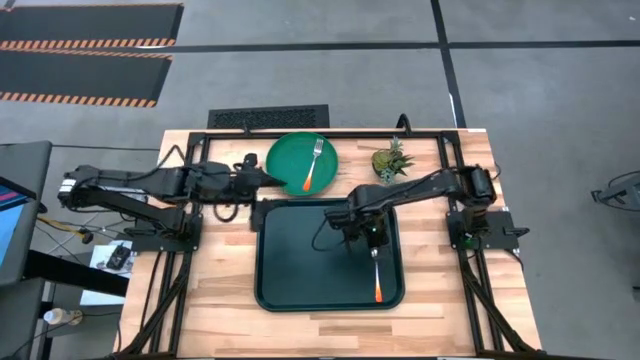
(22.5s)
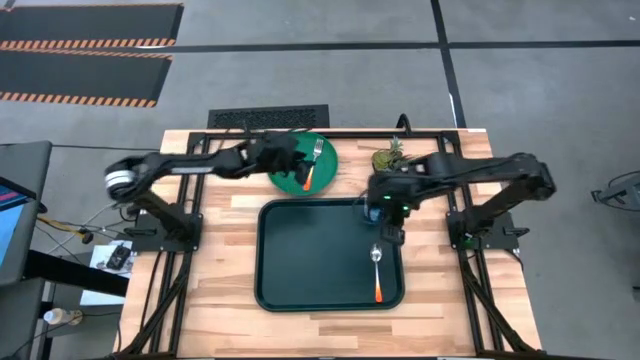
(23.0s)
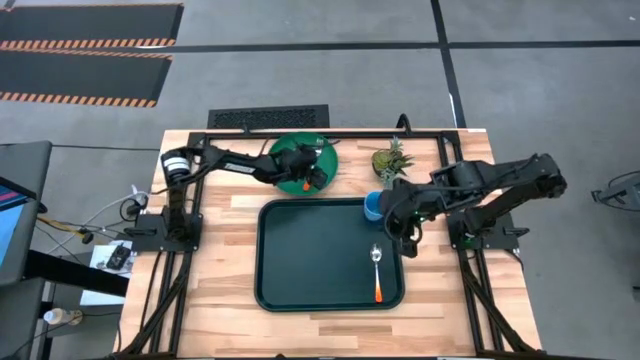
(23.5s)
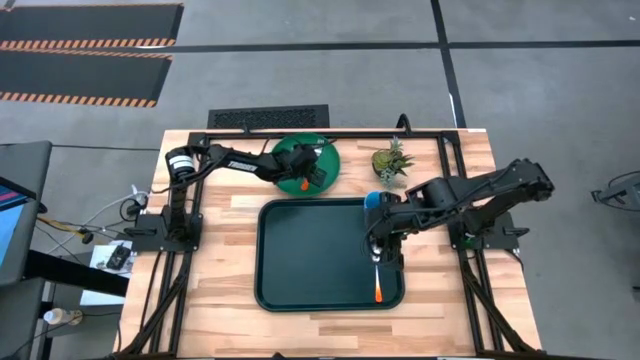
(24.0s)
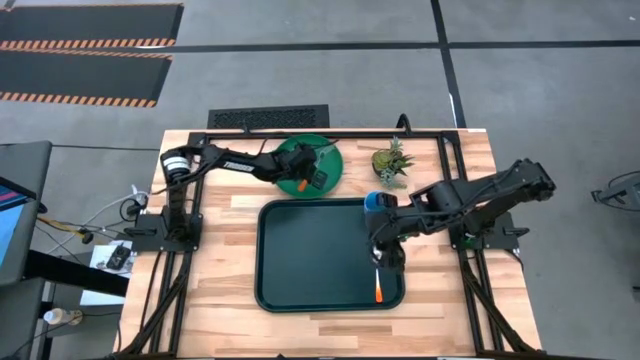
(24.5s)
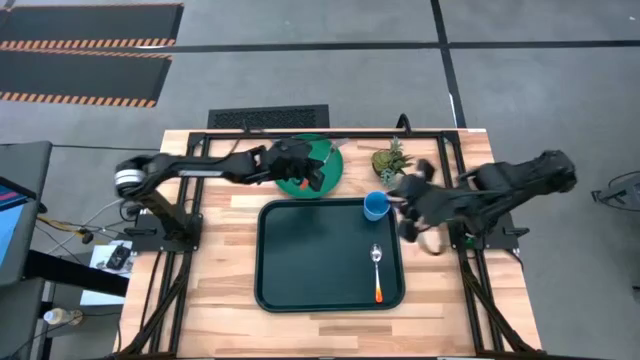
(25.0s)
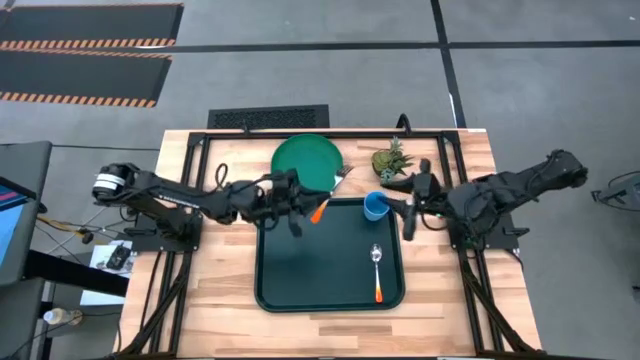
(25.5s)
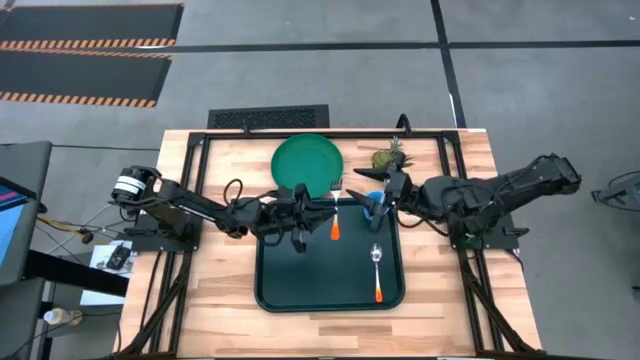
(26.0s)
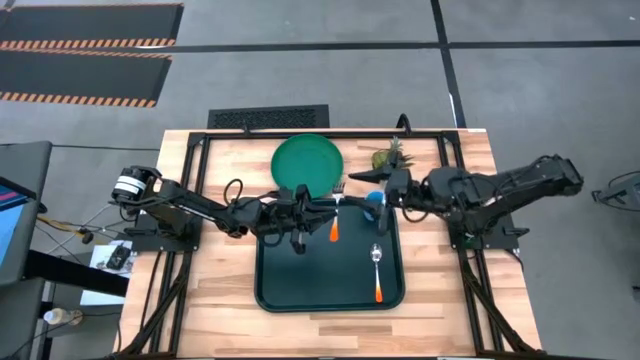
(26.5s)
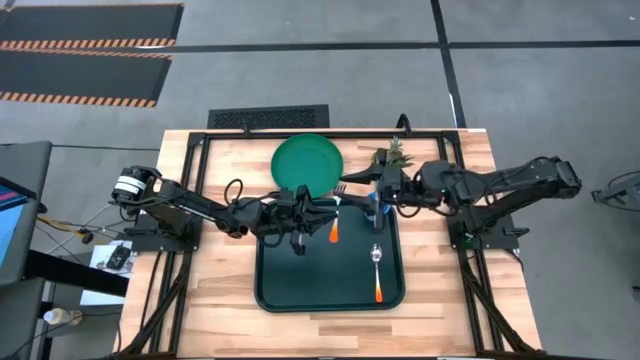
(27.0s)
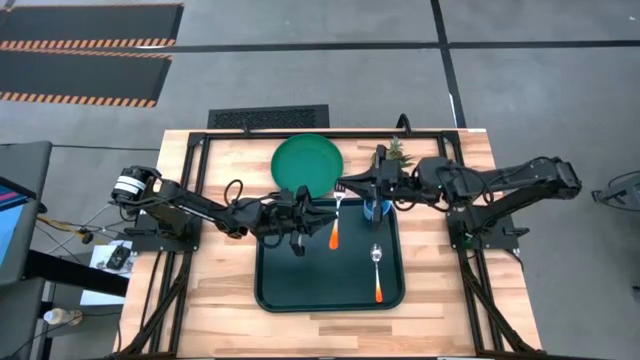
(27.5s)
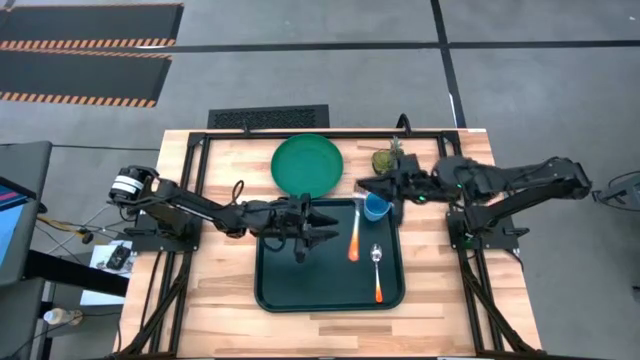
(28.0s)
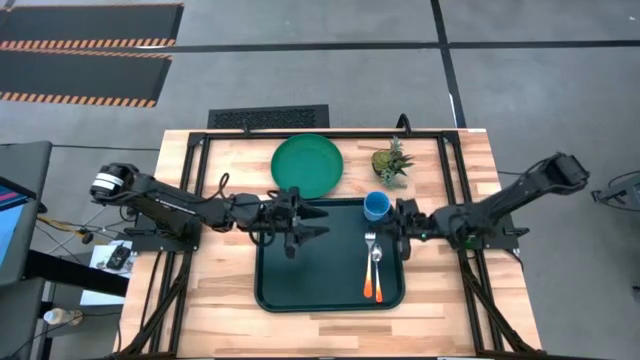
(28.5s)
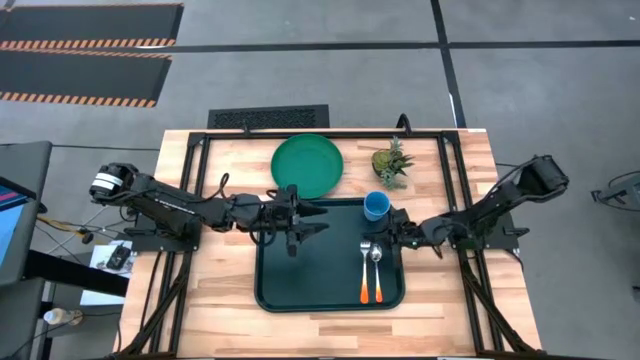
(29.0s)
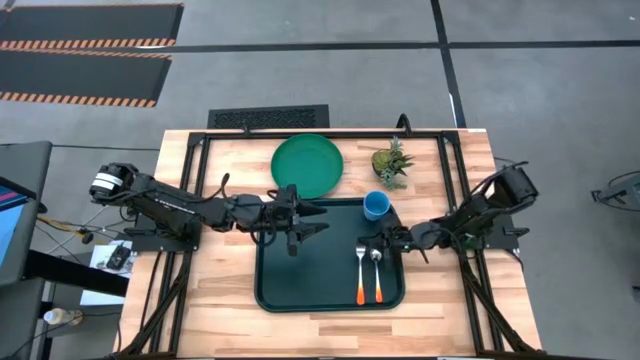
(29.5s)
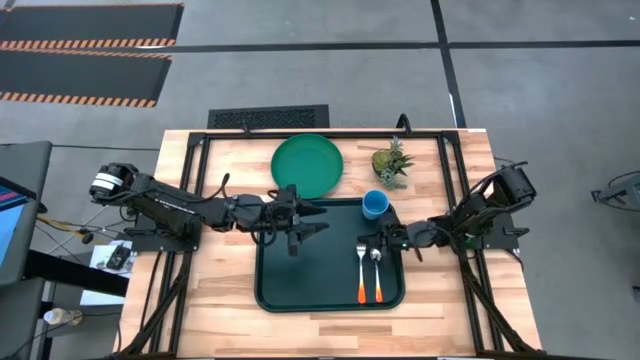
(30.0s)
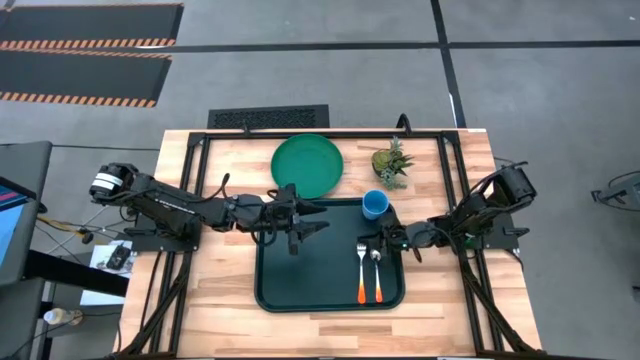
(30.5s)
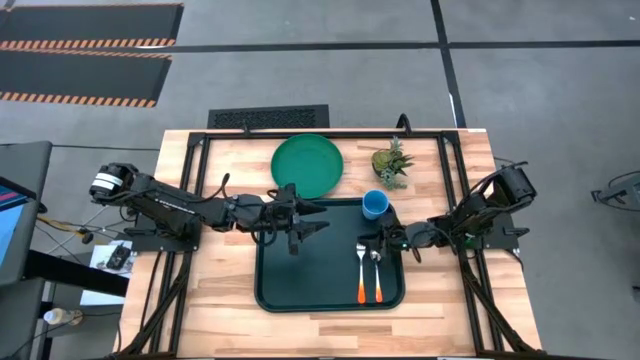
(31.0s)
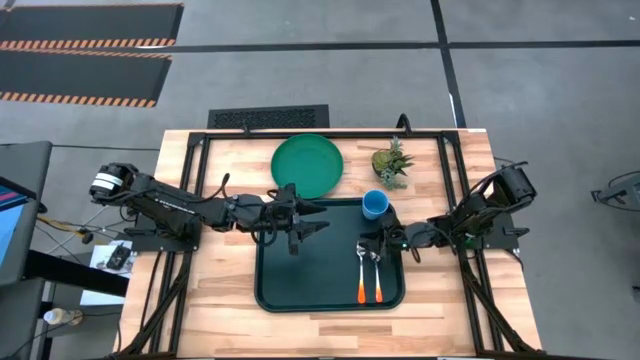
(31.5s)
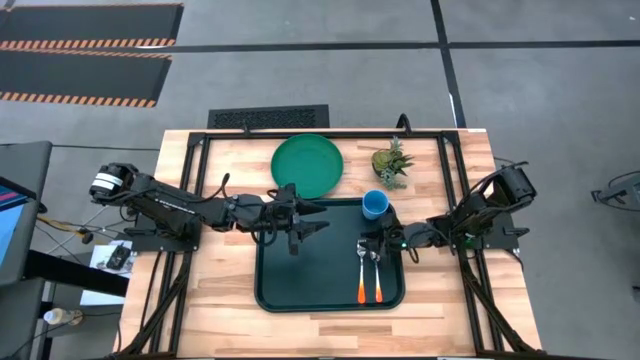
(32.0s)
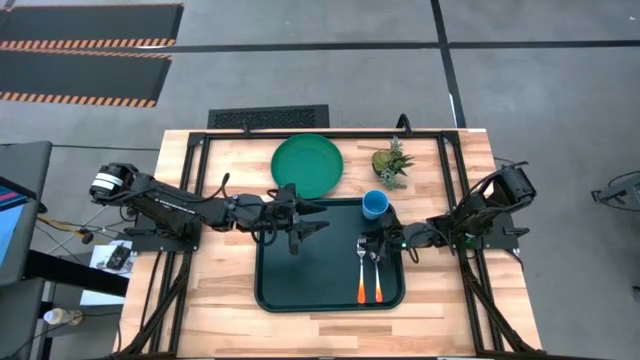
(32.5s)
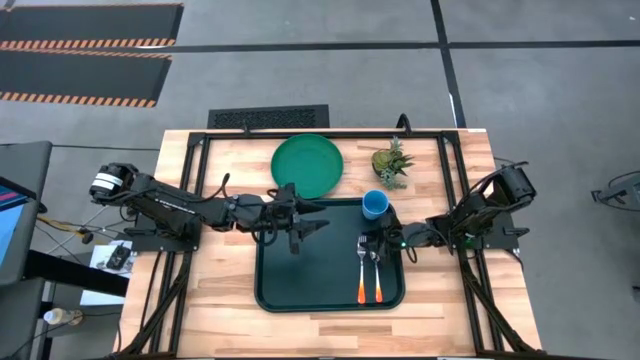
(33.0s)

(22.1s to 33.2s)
Task: Pick and place plate/cup/fork/spoon on tray
Put the orange fork to the left of the orange spoon on the black table tray

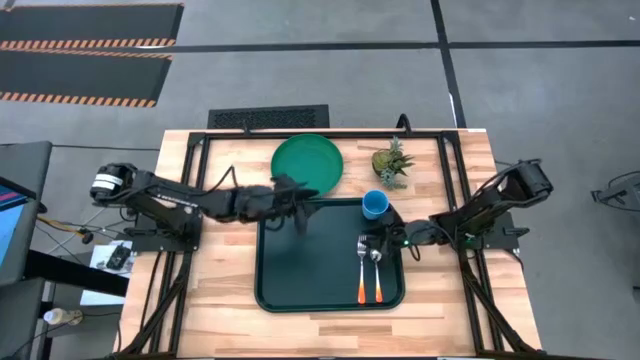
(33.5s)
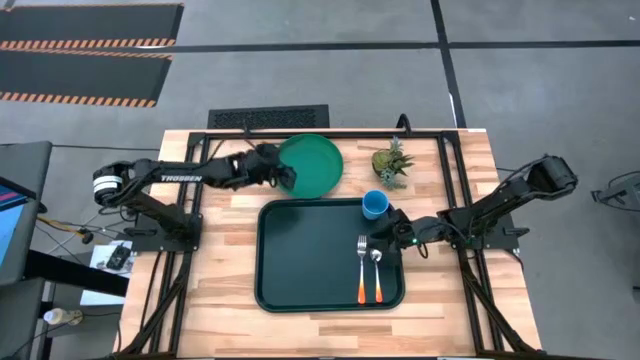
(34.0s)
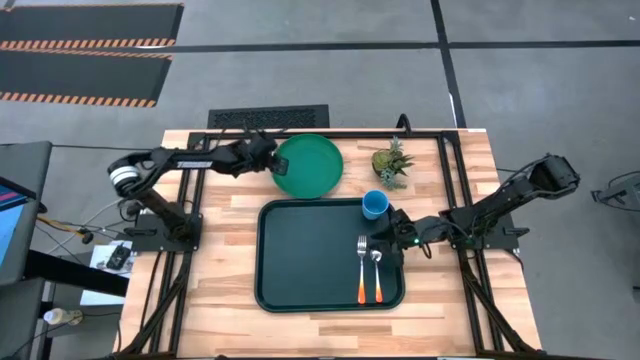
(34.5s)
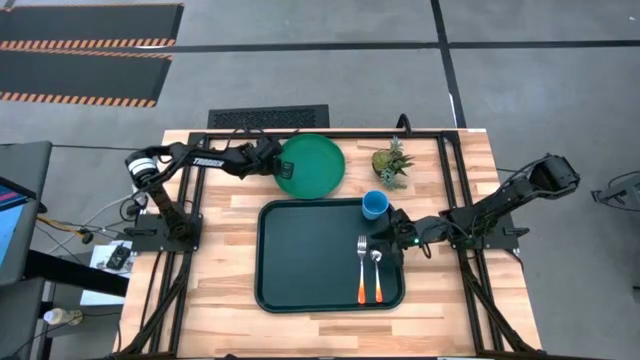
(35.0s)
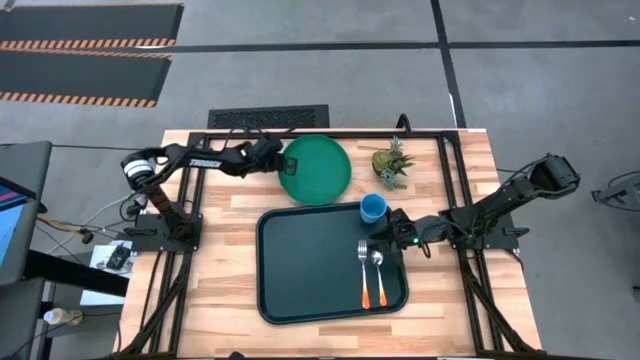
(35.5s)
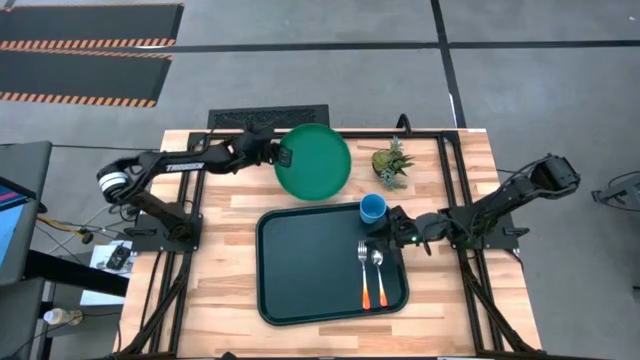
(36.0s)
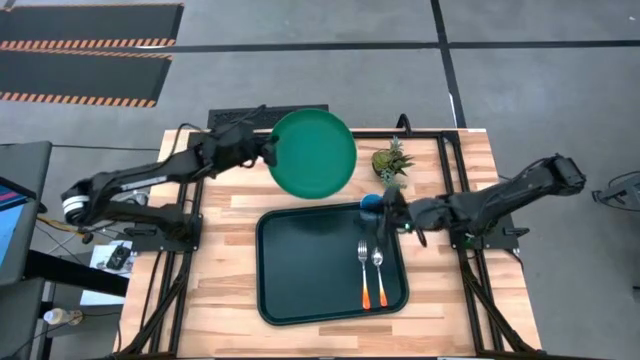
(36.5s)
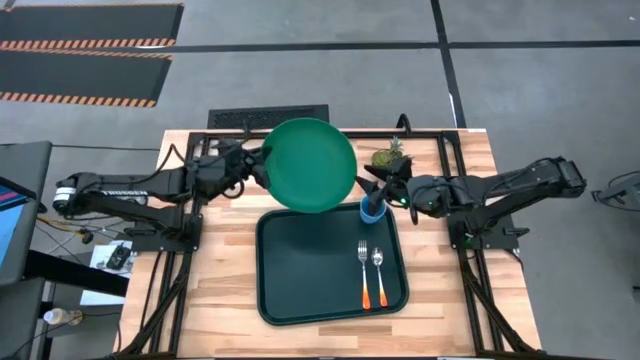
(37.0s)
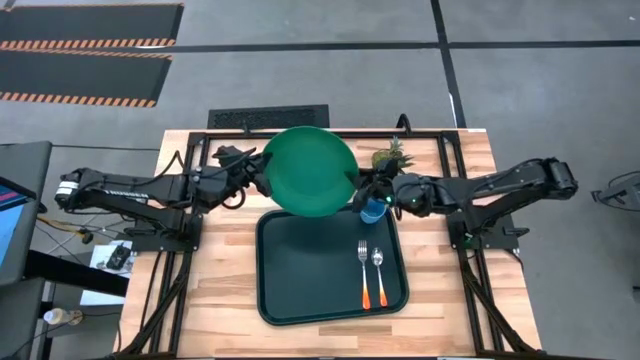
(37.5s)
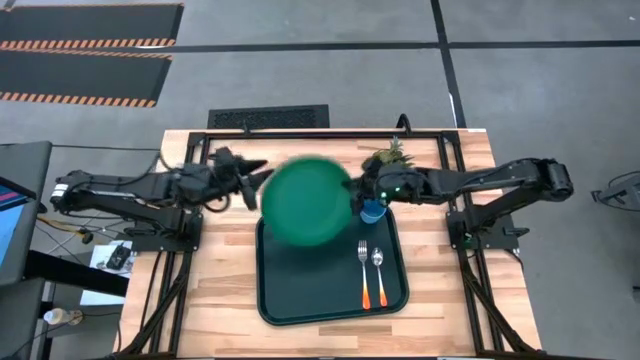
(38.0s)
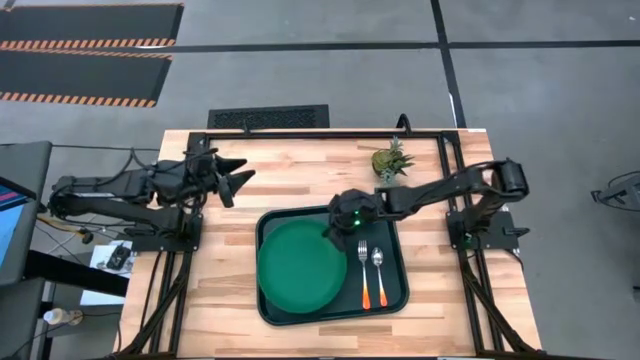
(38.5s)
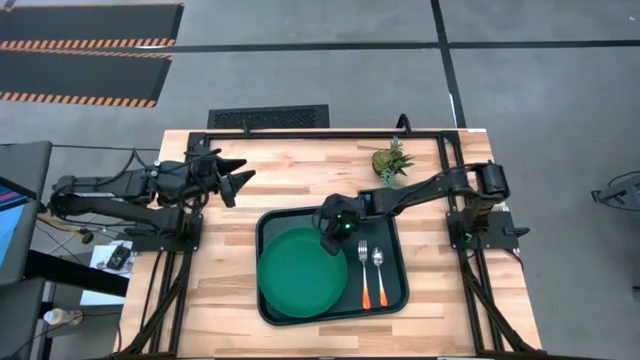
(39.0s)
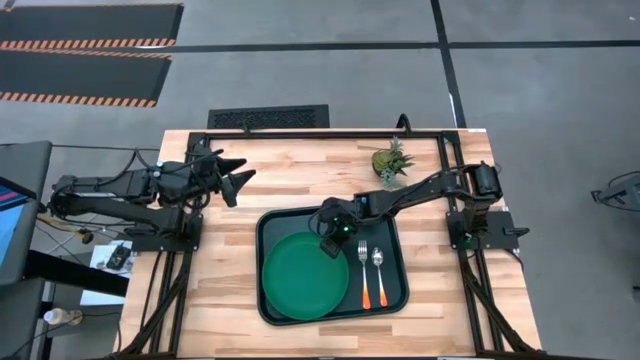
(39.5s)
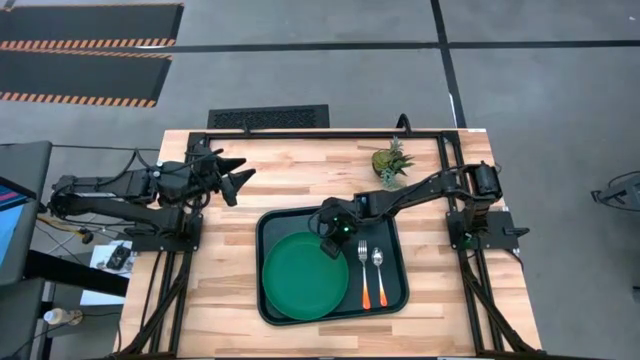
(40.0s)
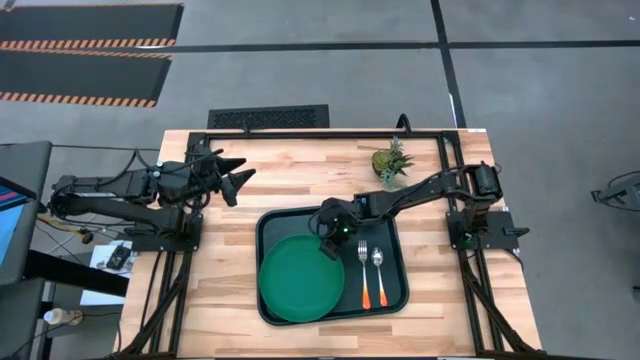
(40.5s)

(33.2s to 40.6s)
Put the green plate to the left of the orange fork on the black table tray

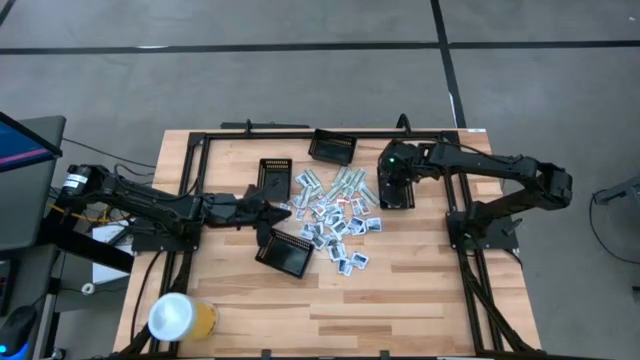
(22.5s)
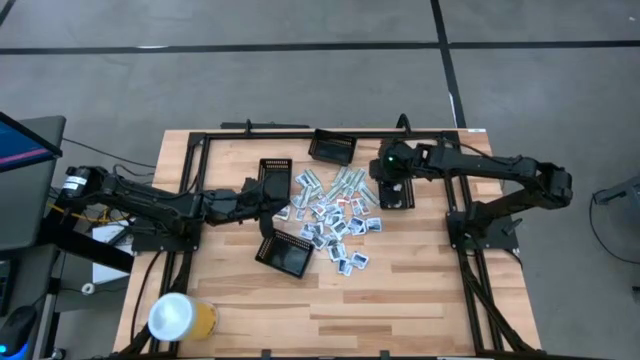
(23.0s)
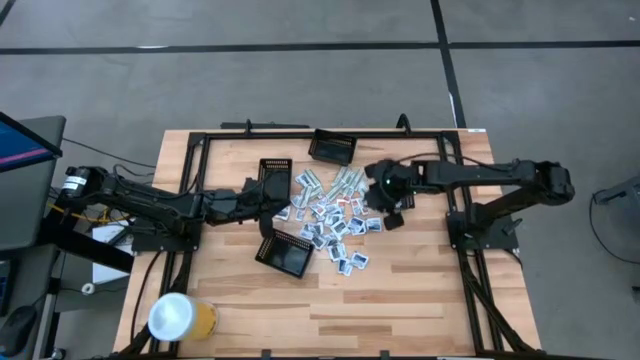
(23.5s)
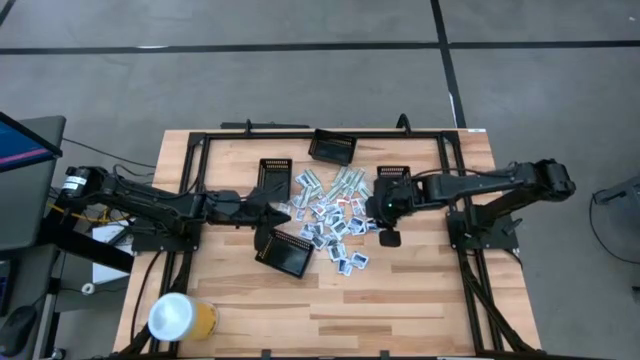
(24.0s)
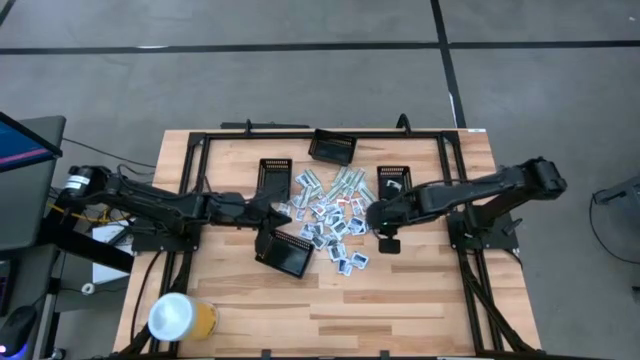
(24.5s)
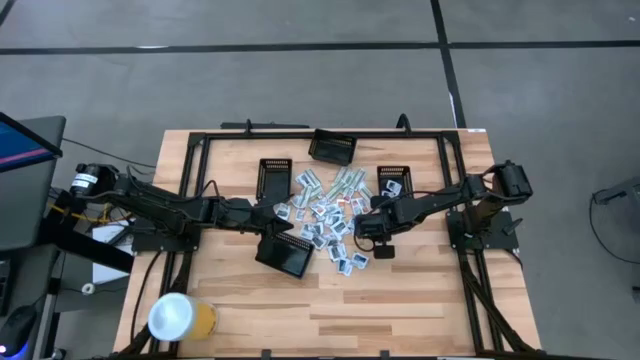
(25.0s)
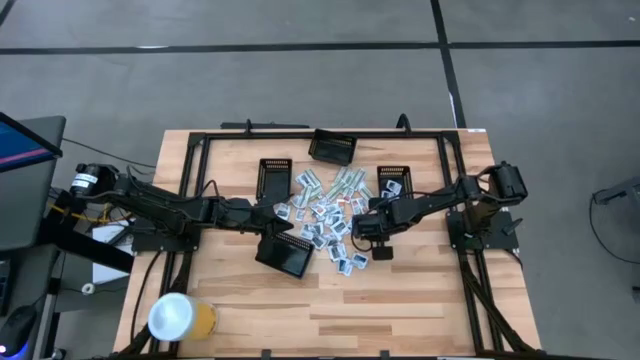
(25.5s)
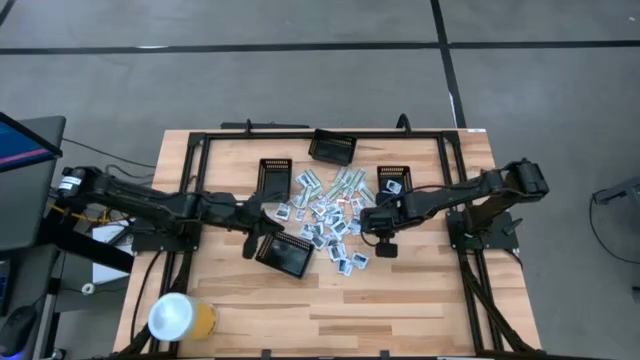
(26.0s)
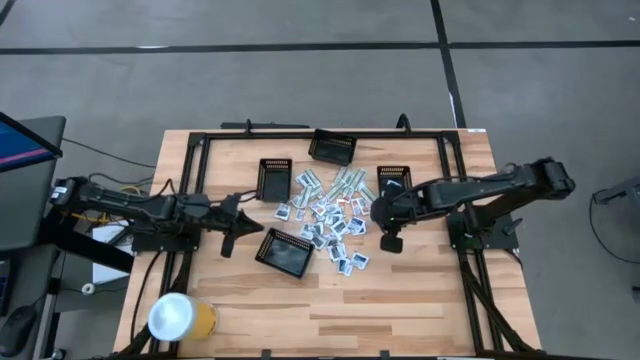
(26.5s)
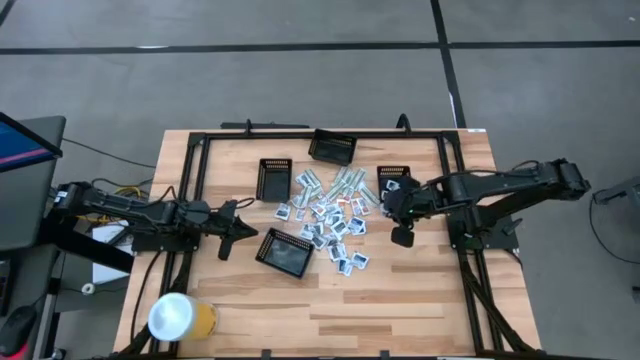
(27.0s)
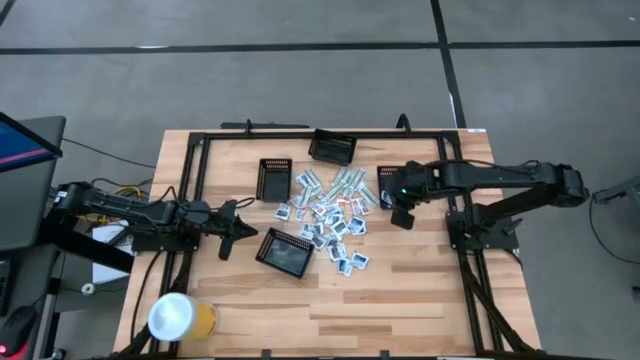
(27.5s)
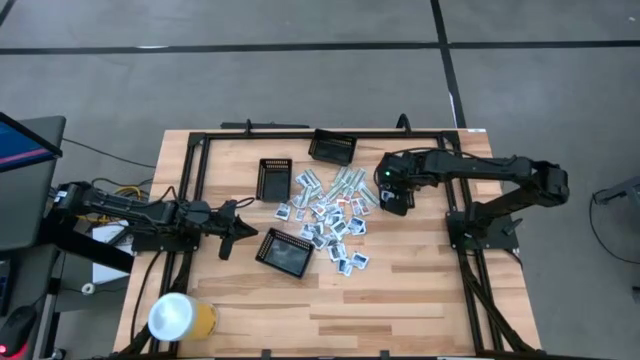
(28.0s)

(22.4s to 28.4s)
Task: Pick & Place First Aid Supplies
Put the white alcohol pad into the right black bin
